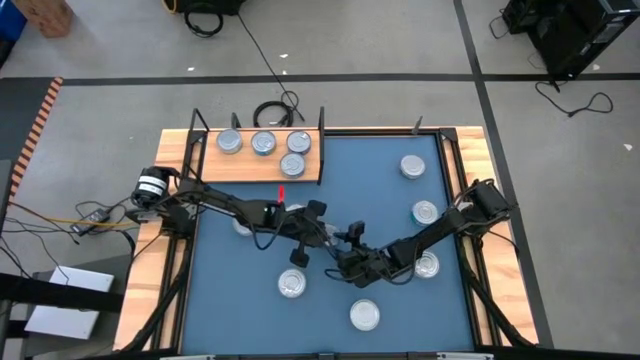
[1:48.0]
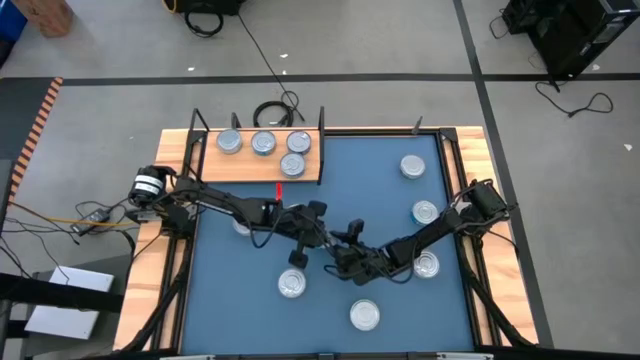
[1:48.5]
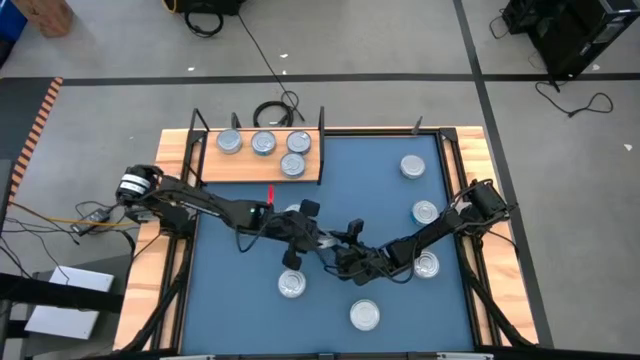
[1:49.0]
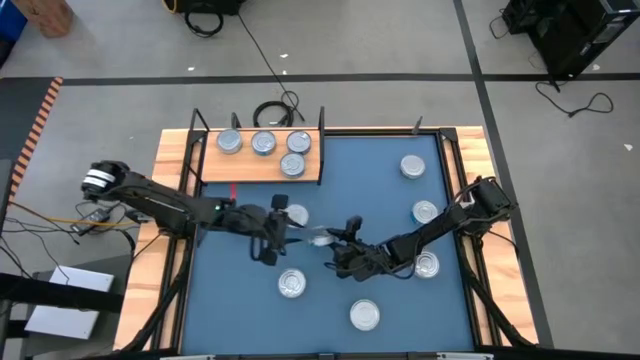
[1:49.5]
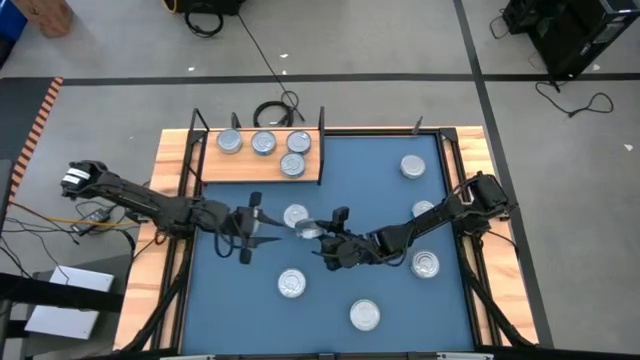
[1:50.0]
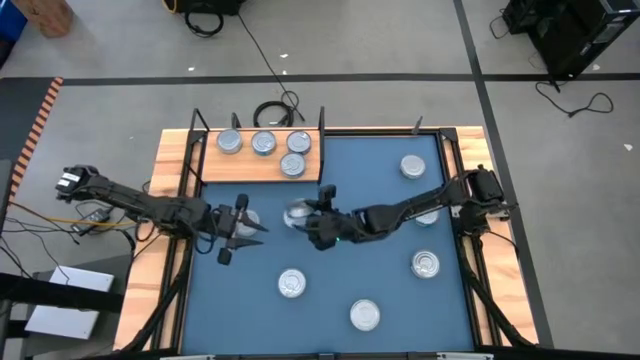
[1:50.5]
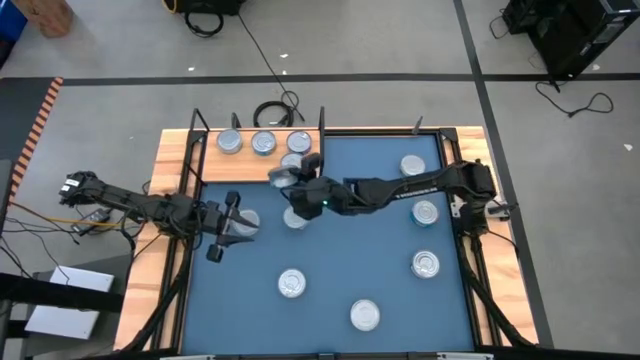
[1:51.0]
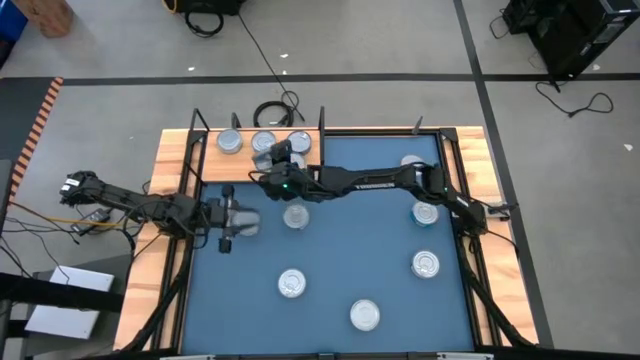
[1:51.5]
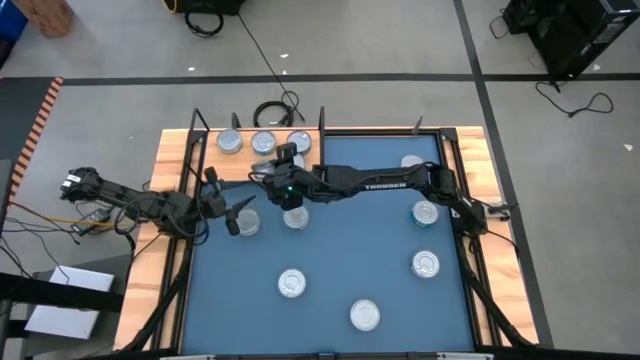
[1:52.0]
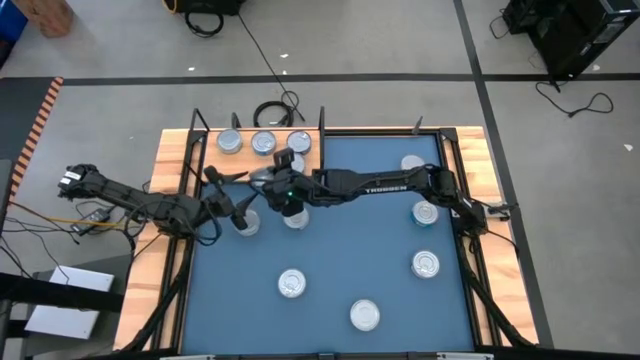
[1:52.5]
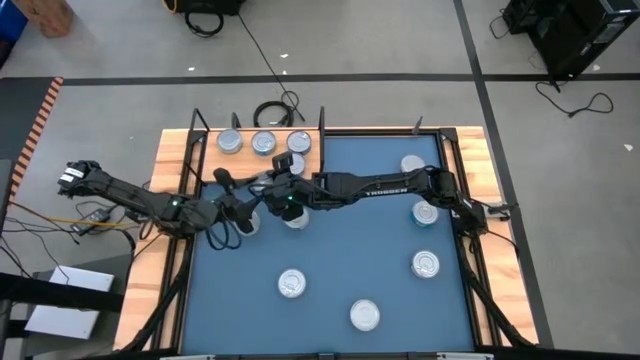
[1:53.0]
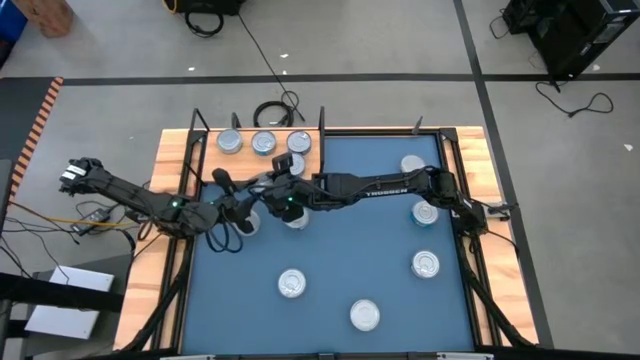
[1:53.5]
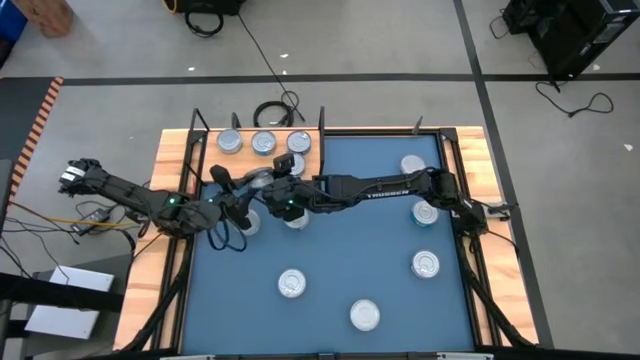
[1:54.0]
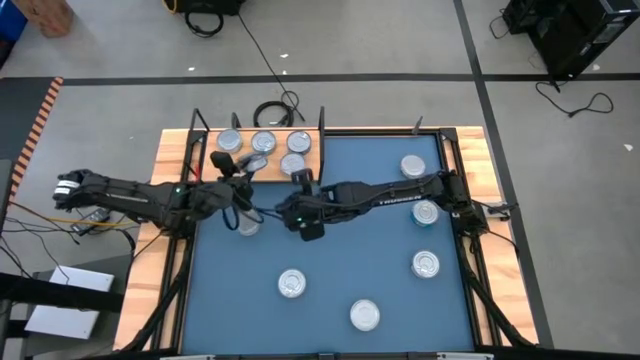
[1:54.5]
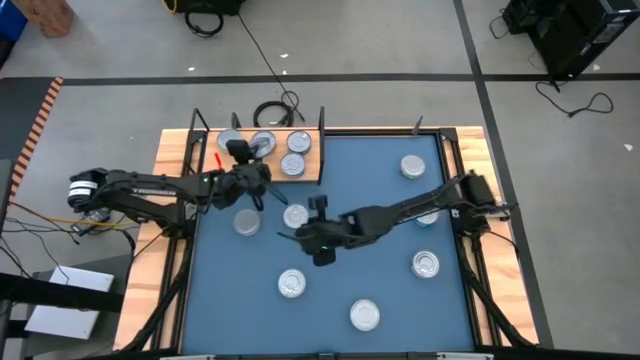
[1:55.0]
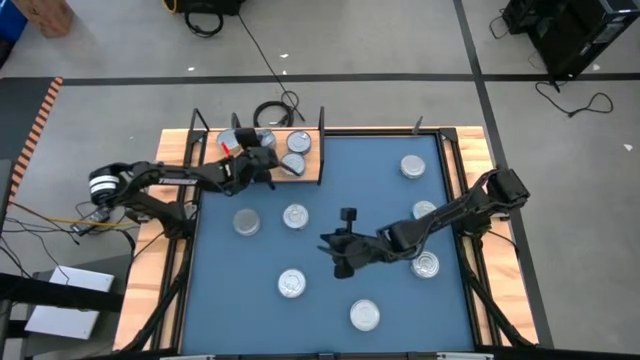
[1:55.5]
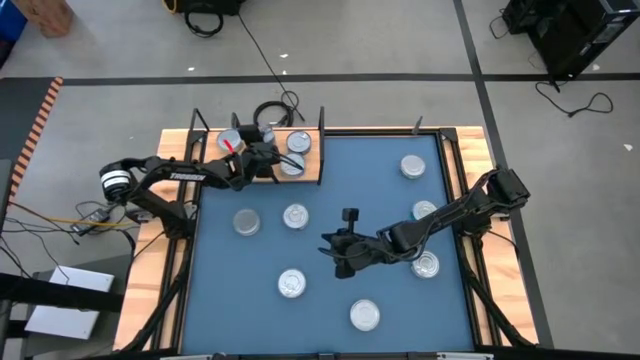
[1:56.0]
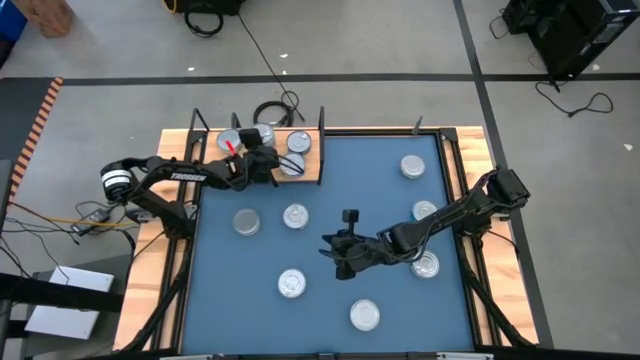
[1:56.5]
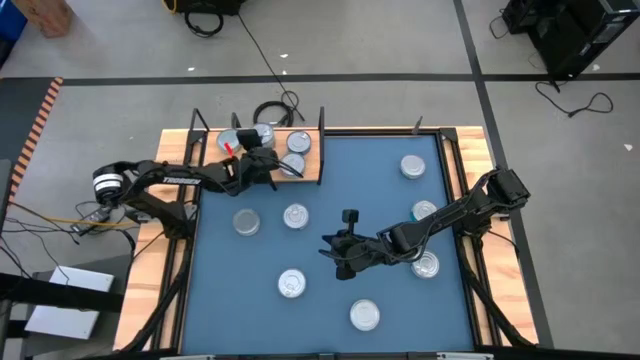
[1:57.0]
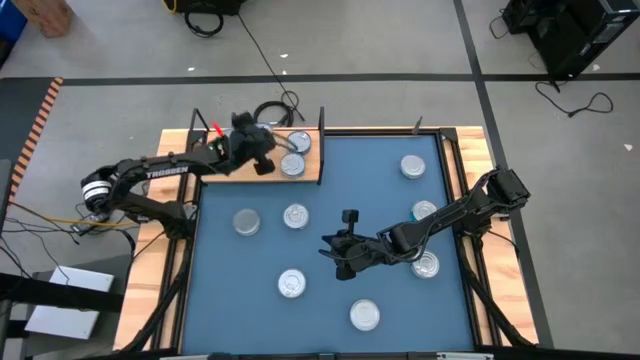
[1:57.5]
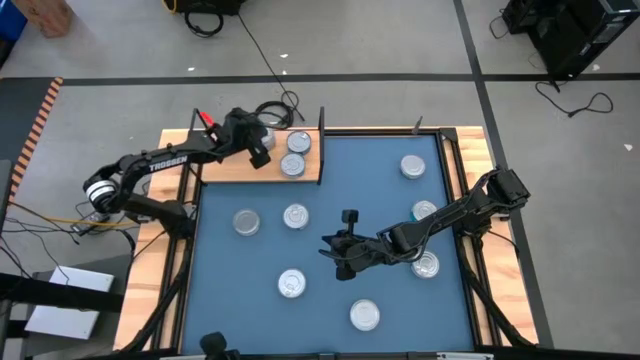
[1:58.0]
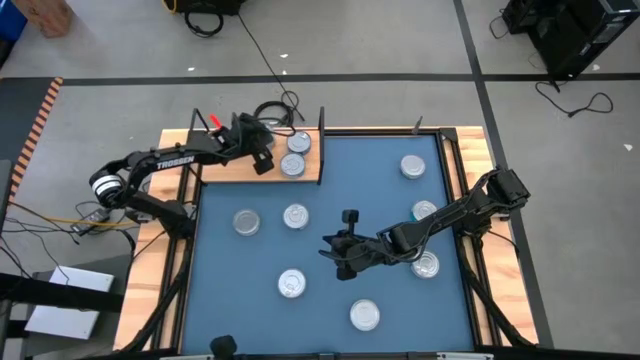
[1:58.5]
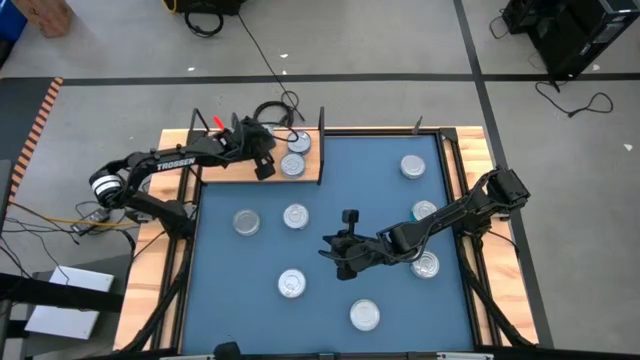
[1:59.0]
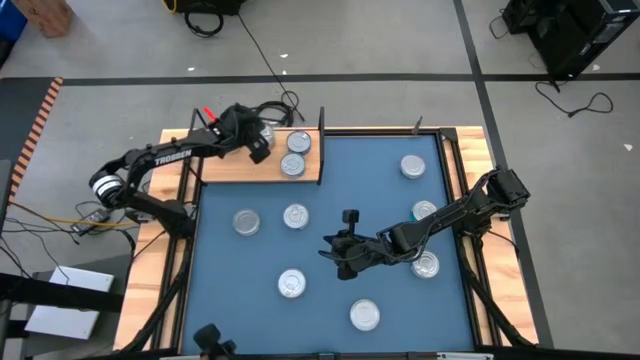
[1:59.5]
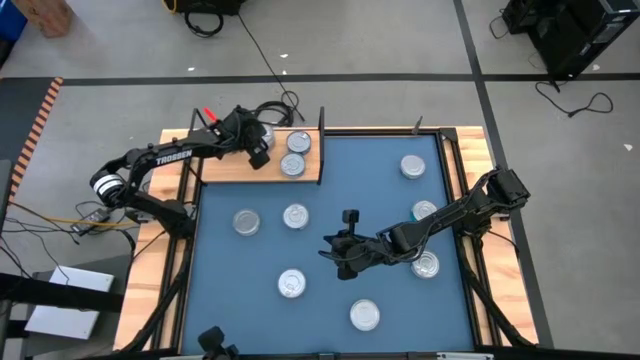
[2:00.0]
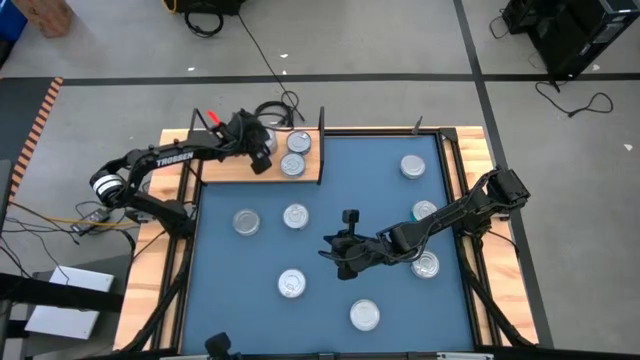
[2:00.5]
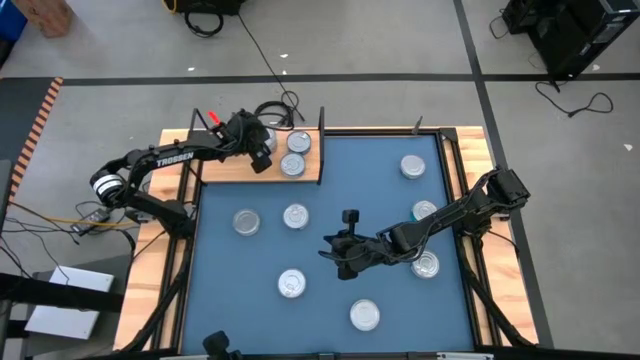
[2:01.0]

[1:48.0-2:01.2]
Task: Stack canned seafood by type on shelf
Stack the yellow blue tuna can on top of the other yellow blue tuna can on the shelf

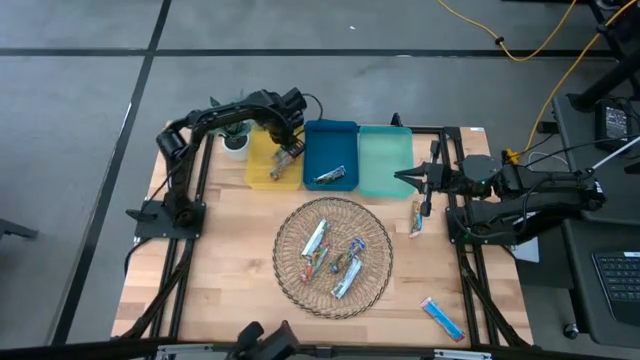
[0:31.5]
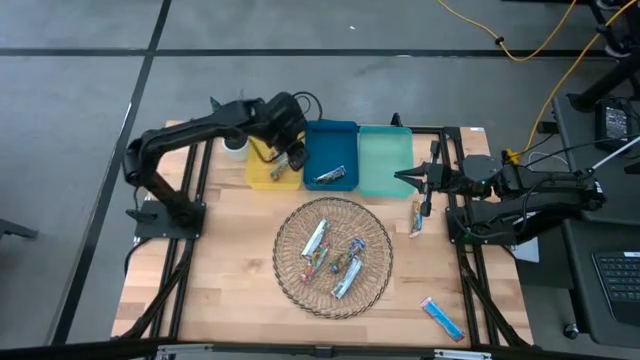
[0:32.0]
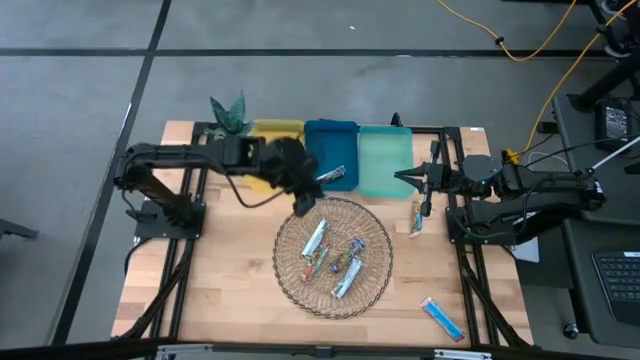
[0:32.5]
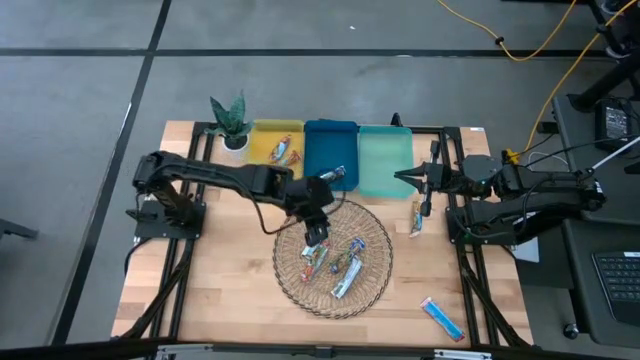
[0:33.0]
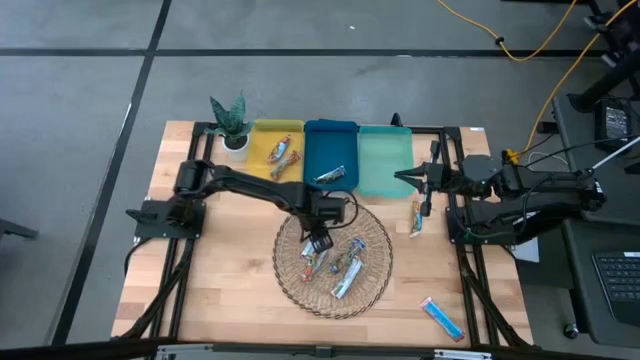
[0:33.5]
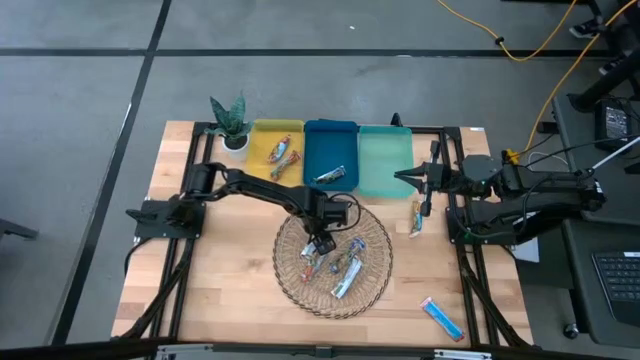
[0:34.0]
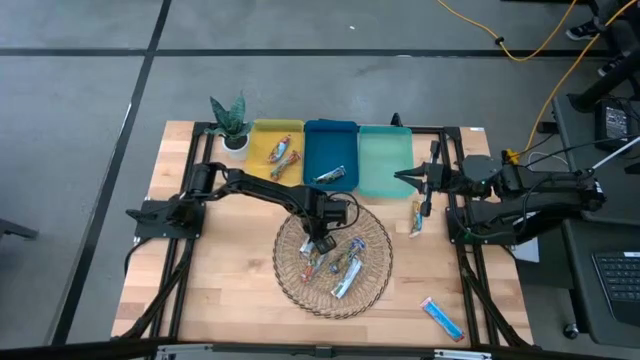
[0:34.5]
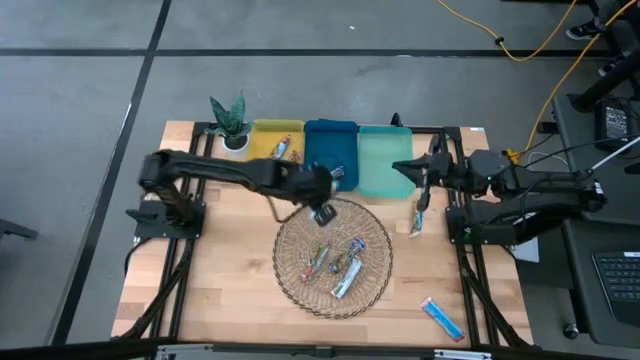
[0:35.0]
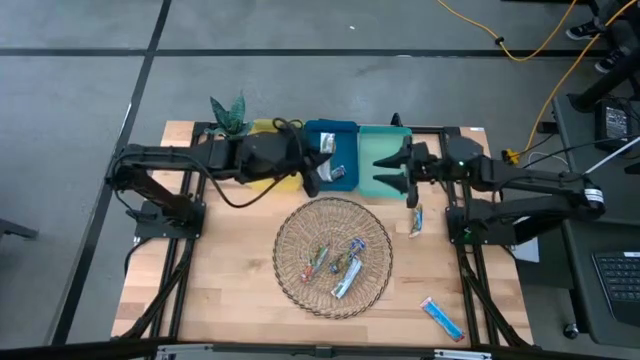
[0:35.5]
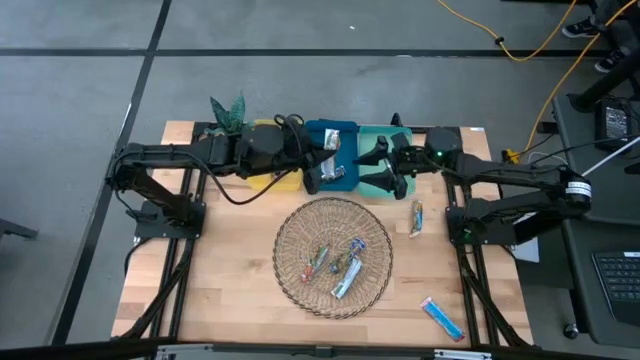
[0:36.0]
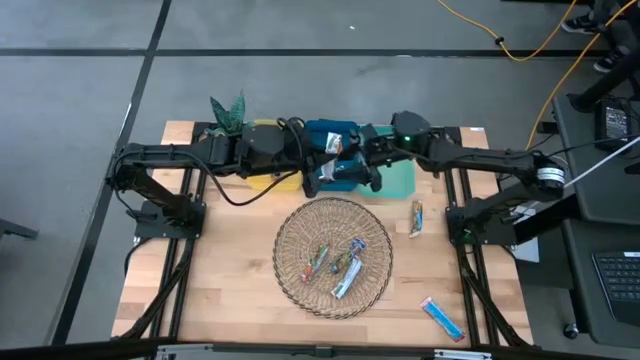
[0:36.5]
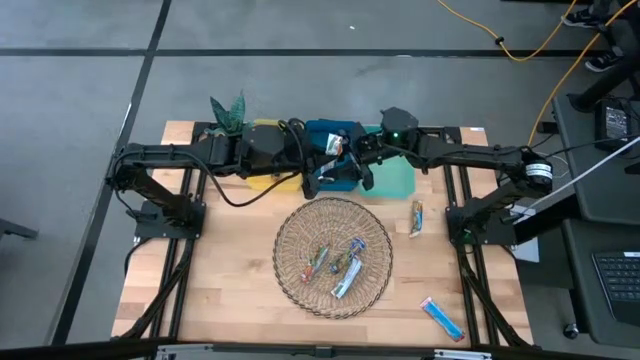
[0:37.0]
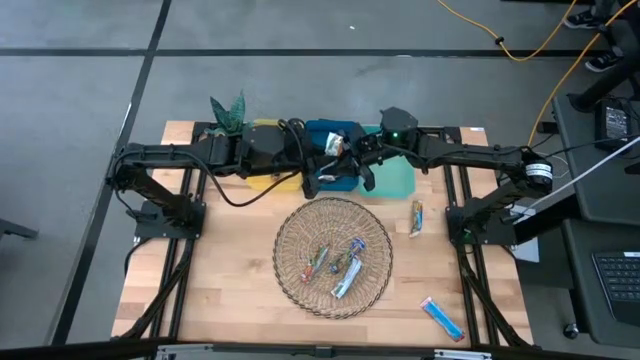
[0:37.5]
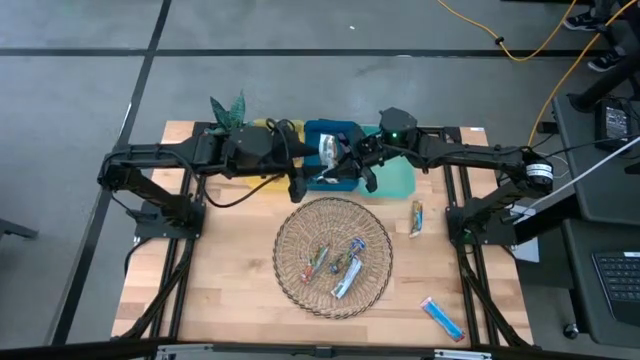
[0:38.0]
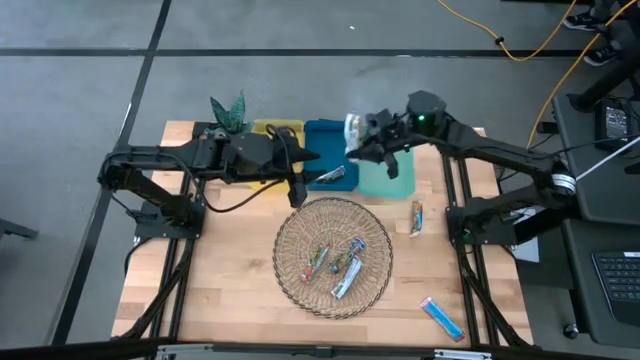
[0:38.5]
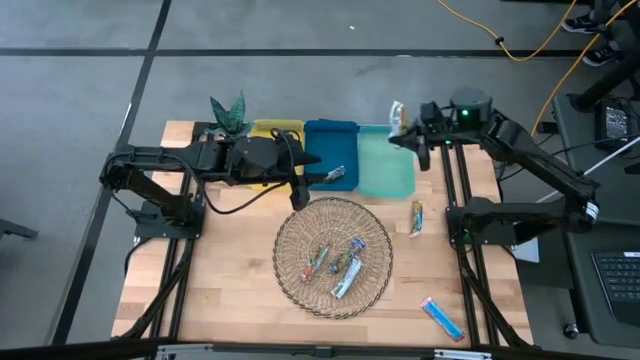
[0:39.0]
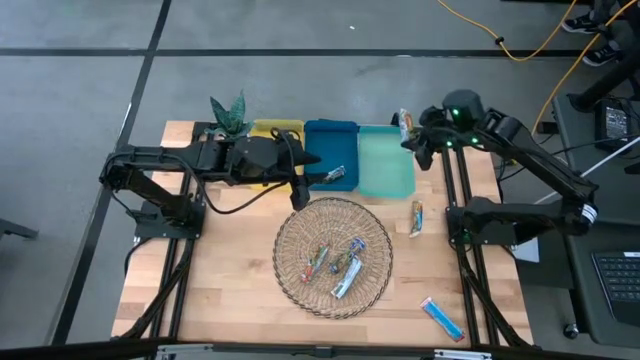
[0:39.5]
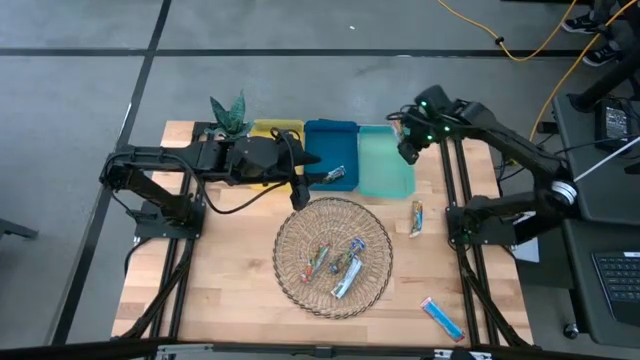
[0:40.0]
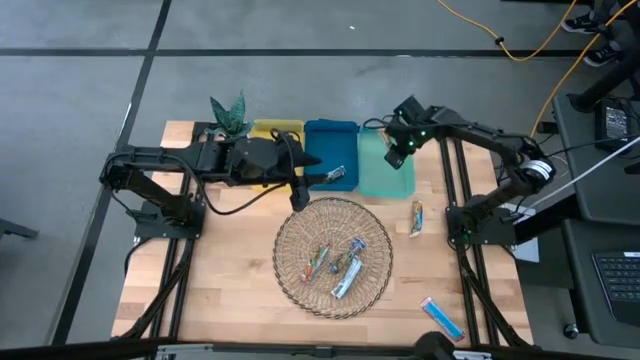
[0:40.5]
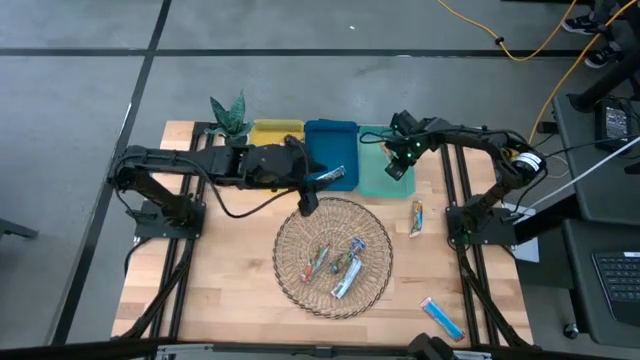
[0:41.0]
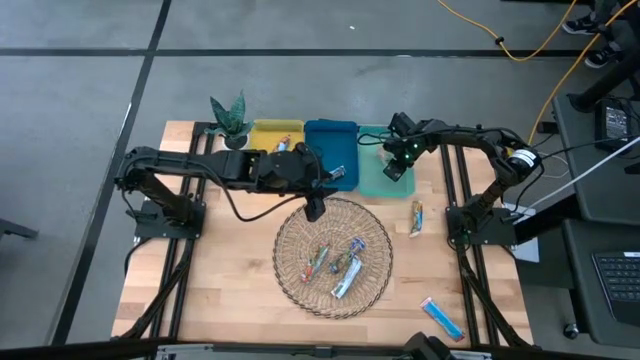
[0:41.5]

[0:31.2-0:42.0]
Task: Pick and place Granola Bars by type
Put the orange granola bar into the green bin
